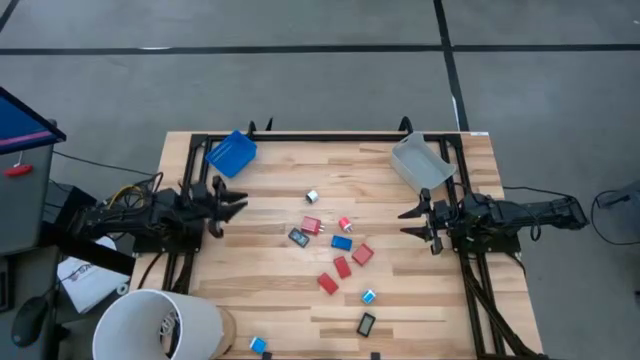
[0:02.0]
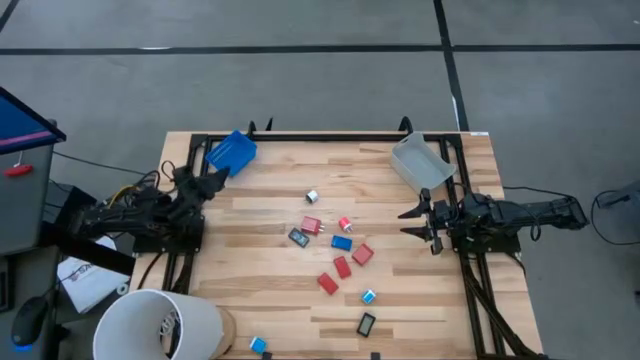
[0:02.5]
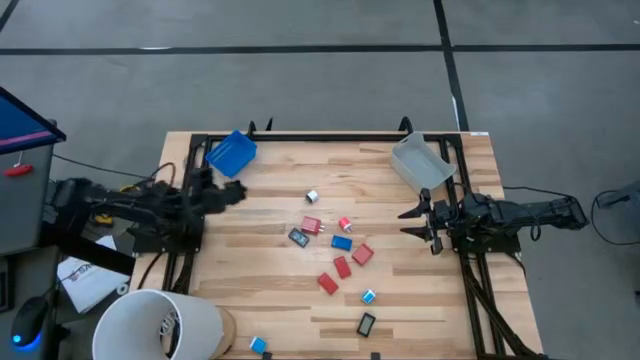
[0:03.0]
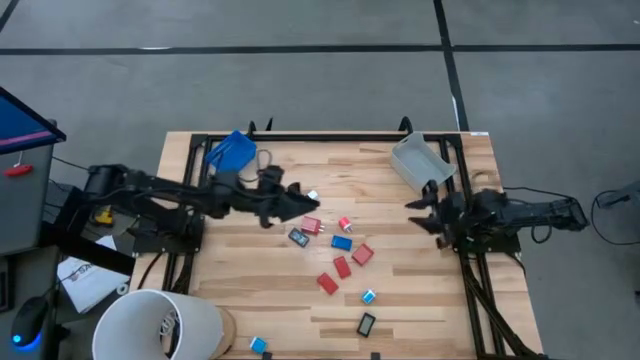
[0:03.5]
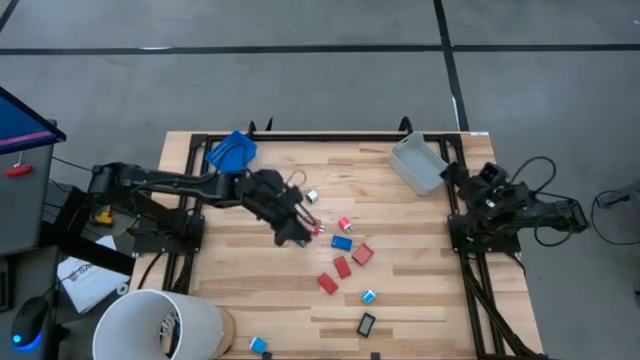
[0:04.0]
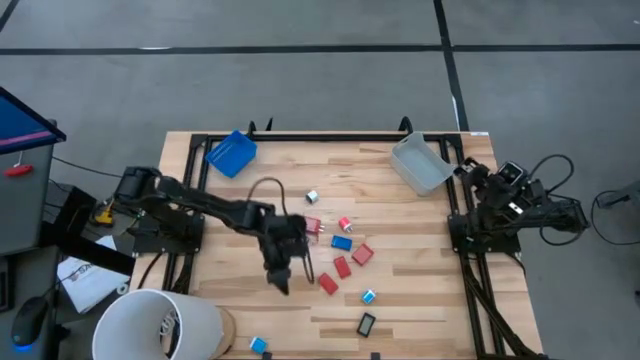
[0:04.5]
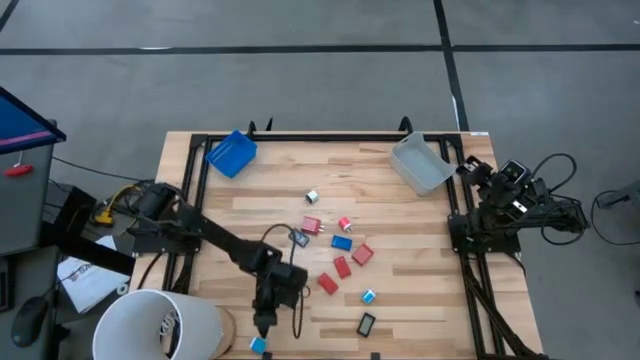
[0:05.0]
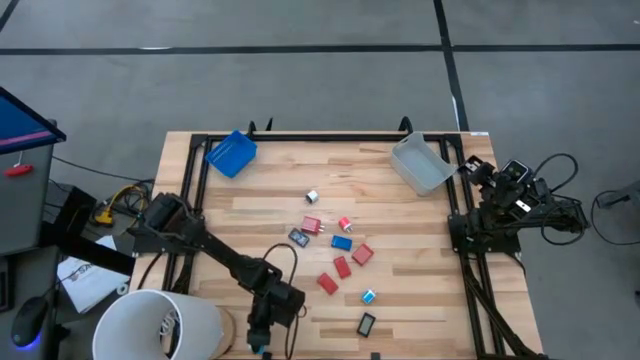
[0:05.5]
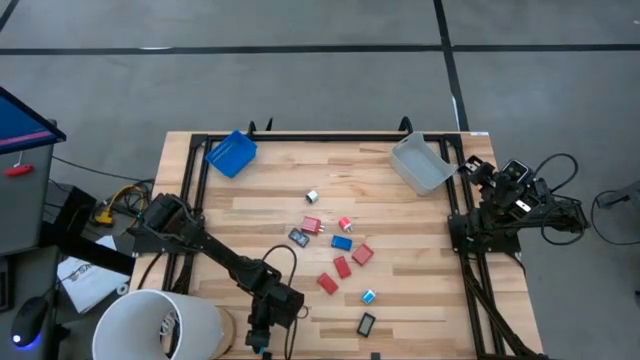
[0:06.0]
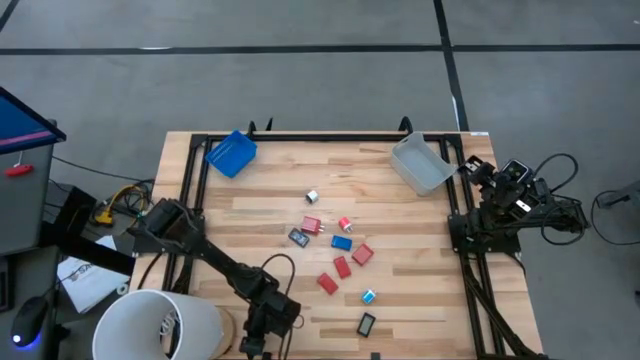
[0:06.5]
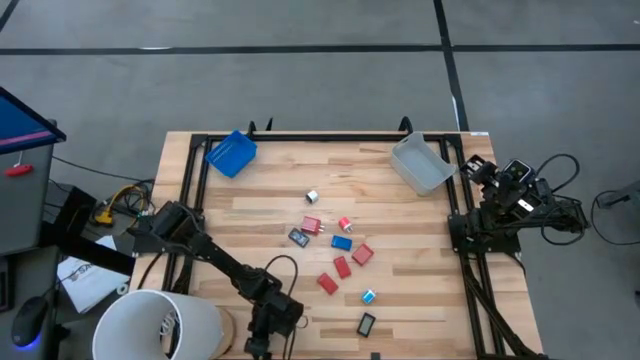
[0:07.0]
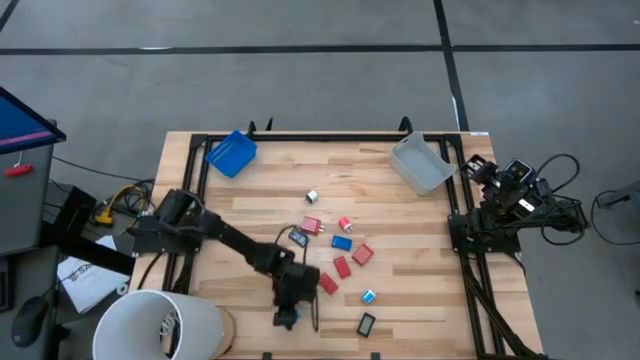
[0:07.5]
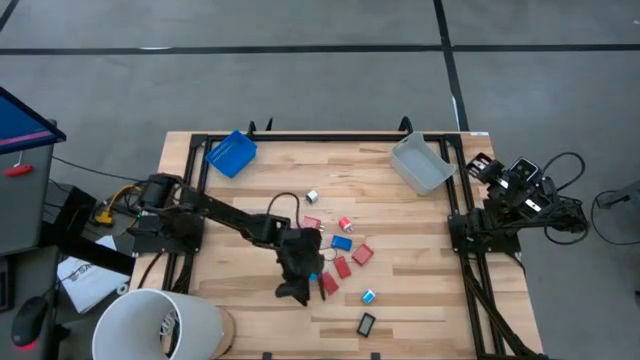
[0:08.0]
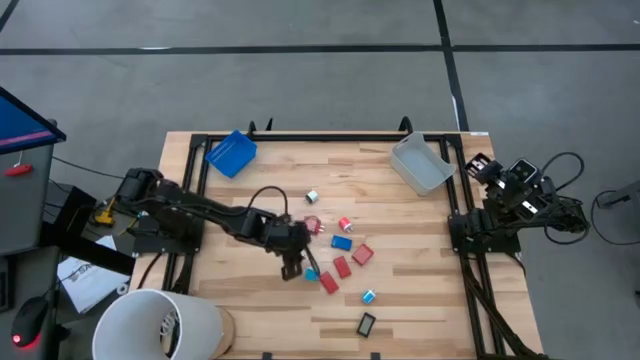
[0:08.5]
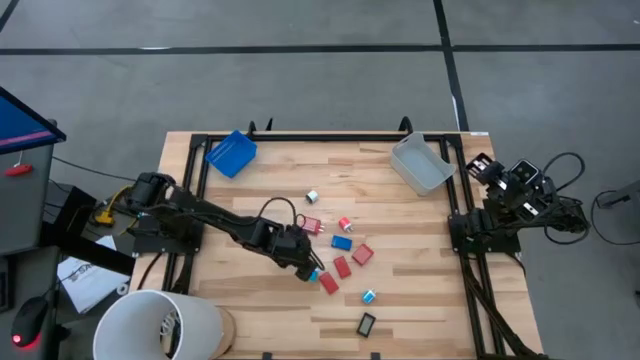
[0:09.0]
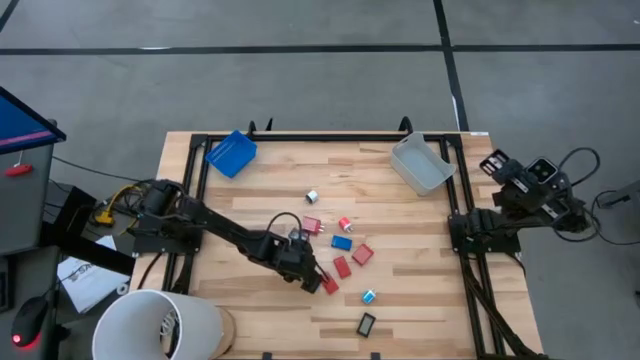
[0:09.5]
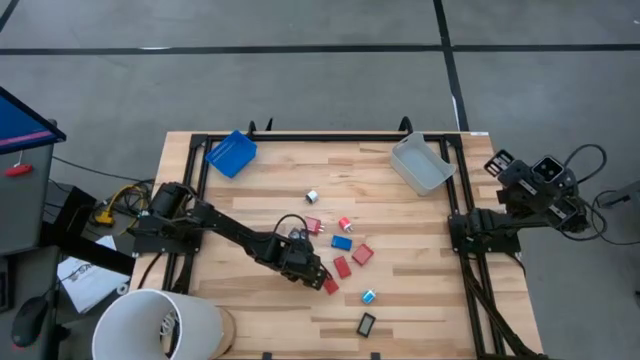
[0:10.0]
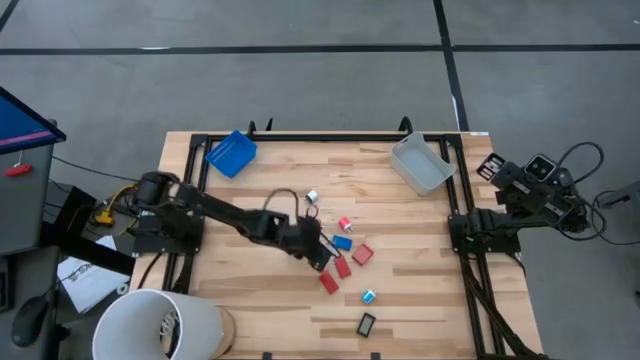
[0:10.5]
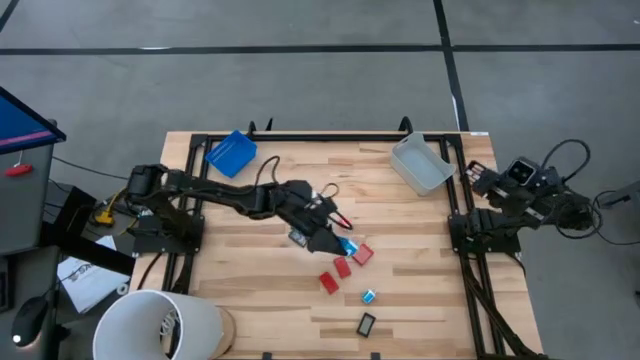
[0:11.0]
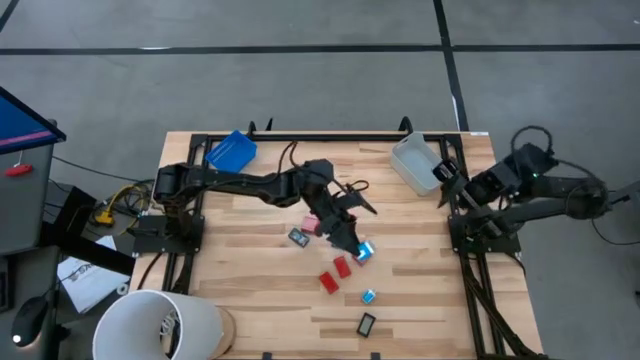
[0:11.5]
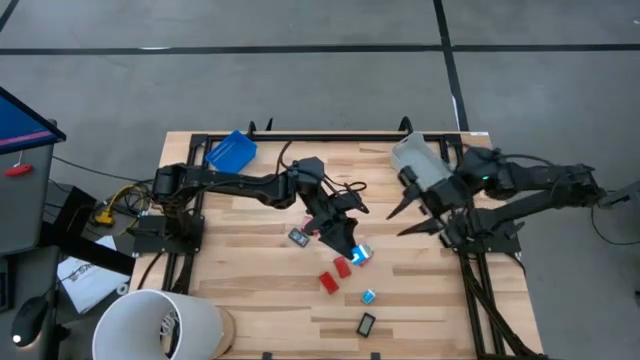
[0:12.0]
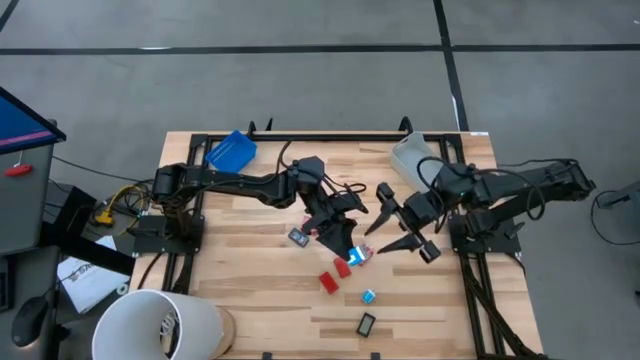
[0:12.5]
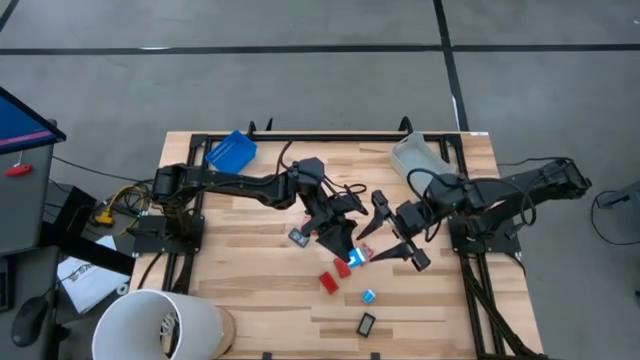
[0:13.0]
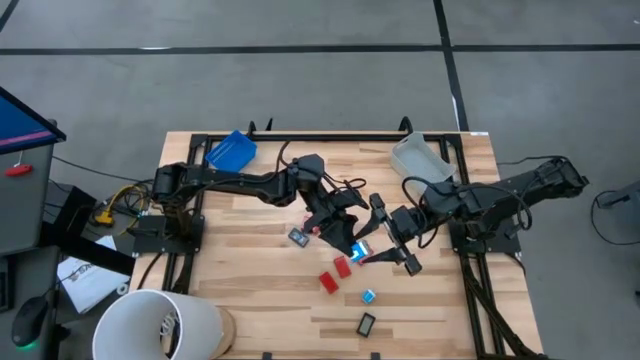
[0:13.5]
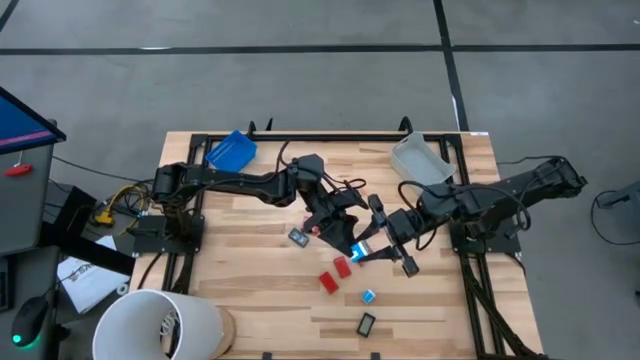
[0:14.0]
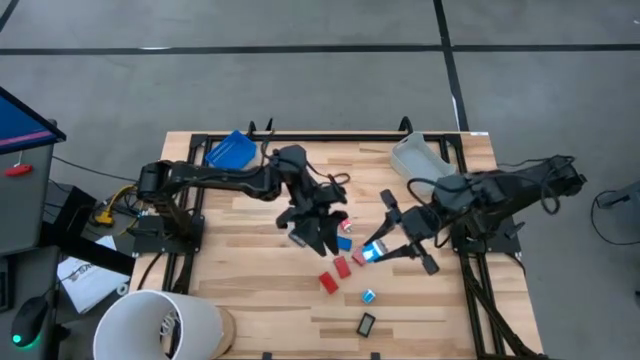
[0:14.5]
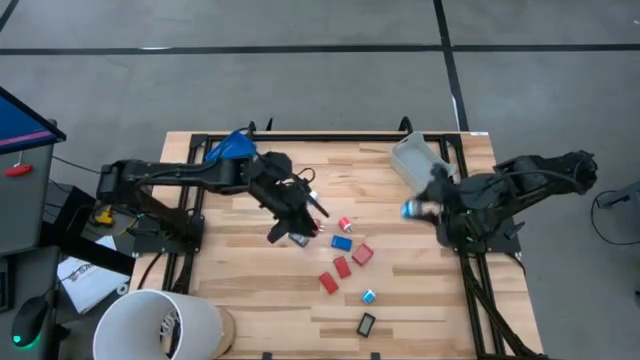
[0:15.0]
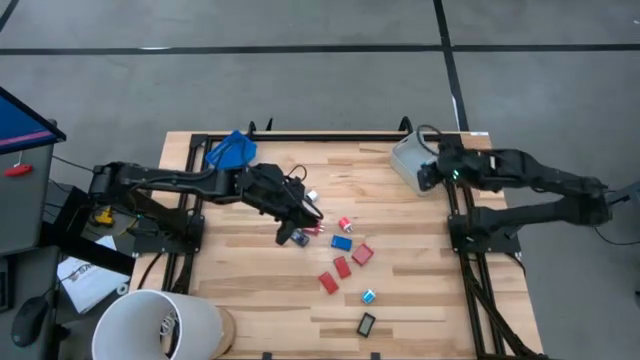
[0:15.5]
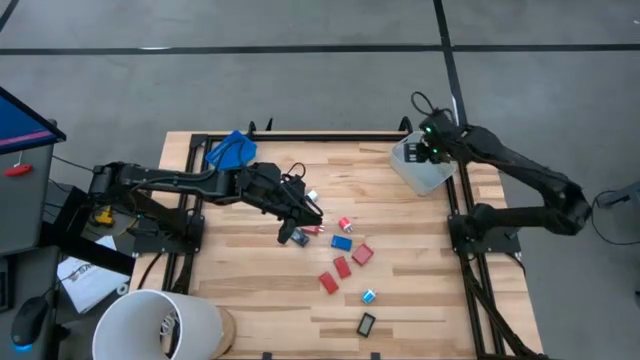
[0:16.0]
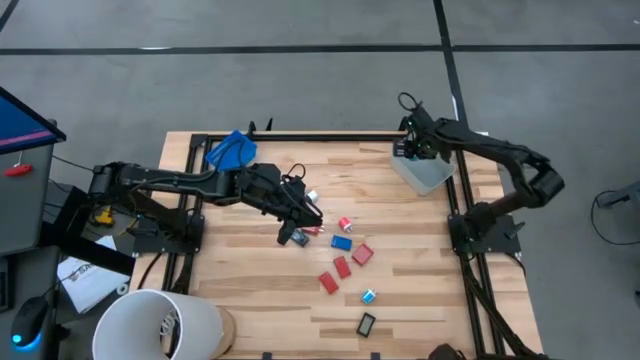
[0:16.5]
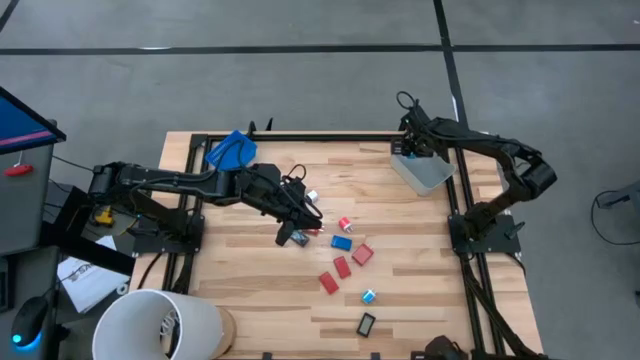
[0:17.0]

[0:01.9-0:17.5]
Task: Pick & Place Office items
Put the bottom blue charger into the gray bin

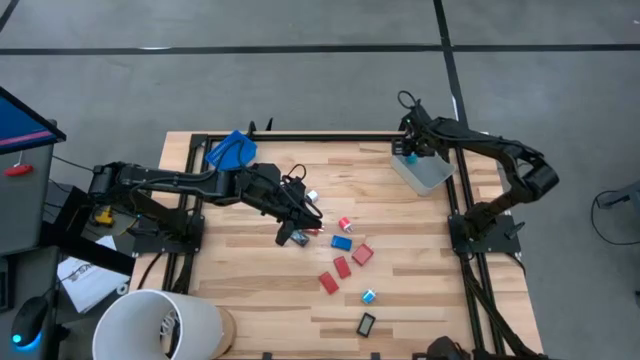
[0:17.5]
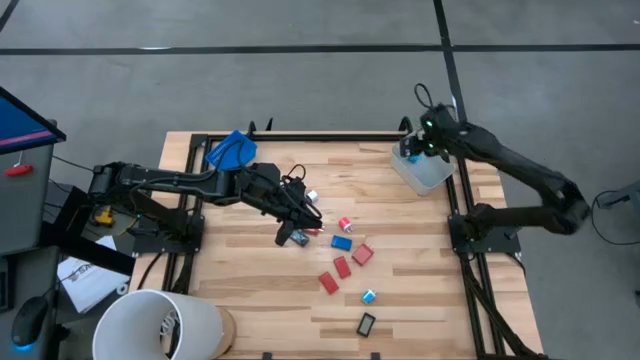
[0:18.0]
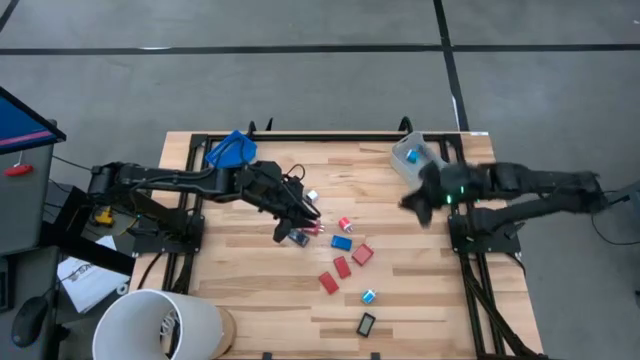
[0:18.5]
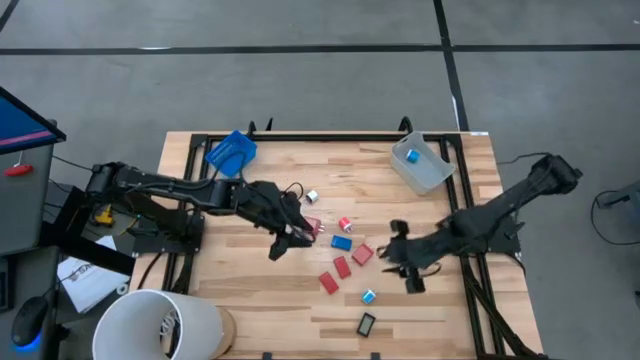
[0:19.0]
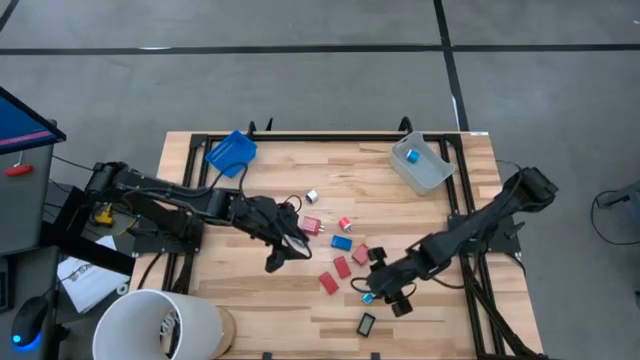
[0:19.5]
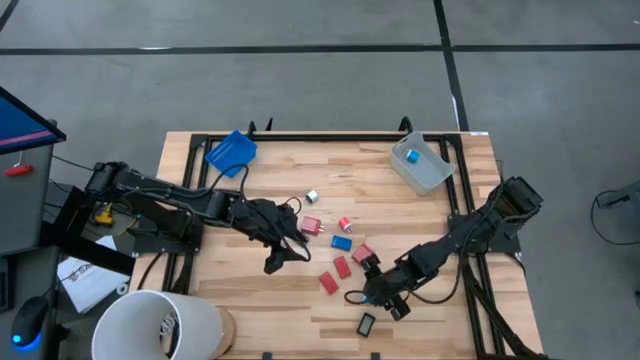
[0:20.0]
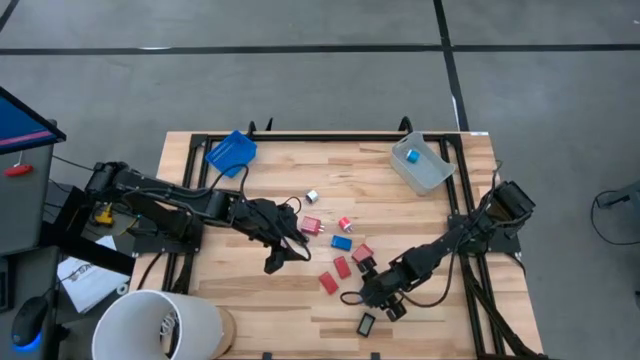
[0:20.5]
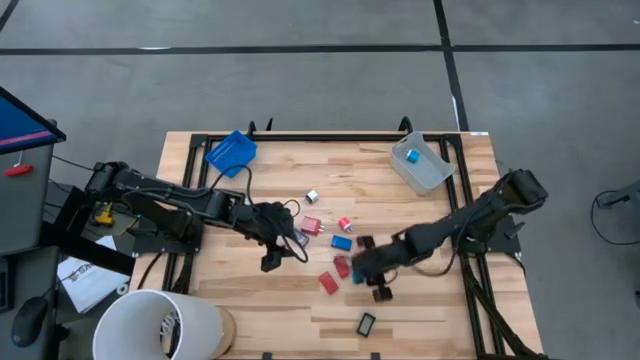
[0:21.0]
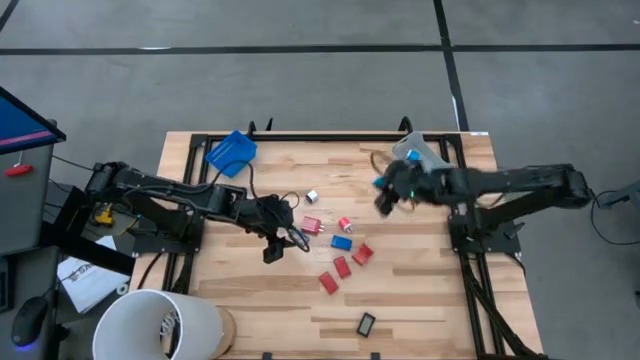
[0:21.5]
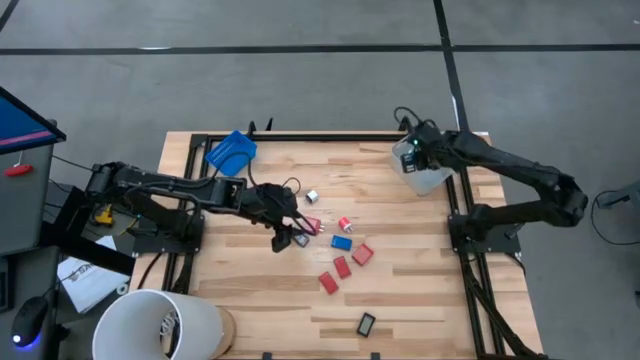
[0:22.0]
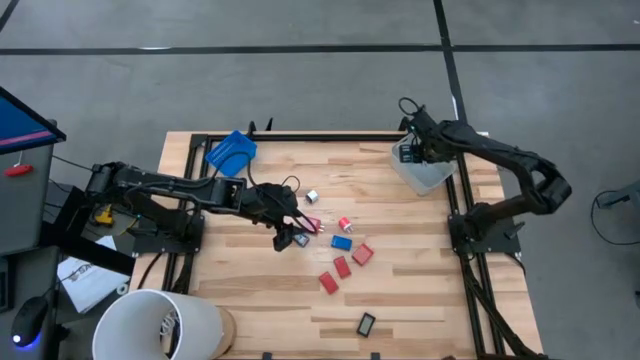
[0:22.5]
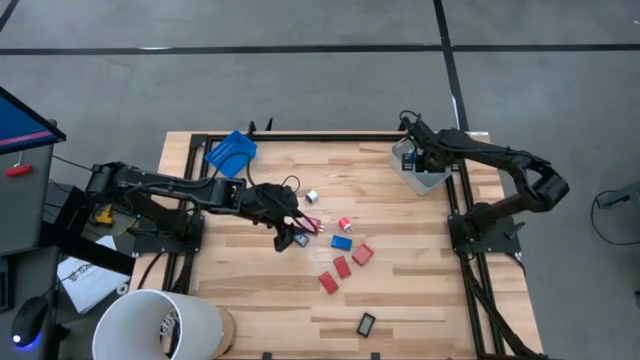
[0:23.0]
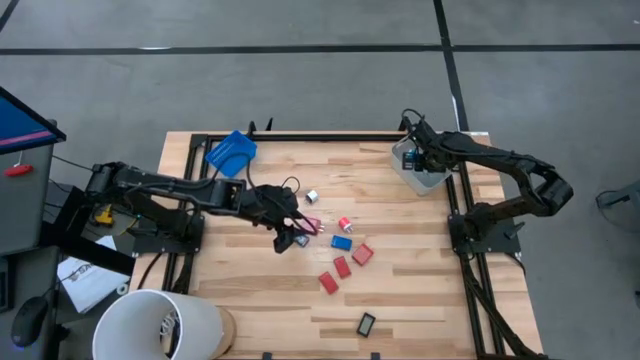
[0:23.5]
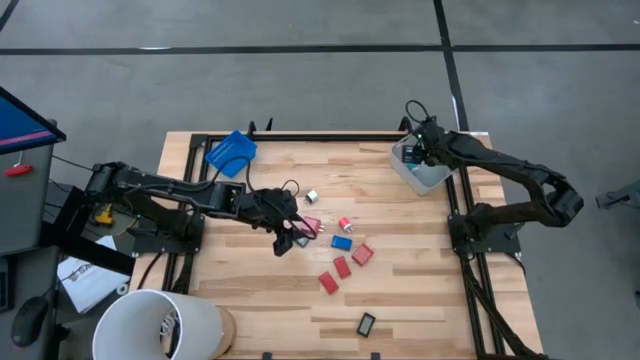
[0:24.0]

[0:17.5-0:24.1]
Put the light blue charger into the gray bin
